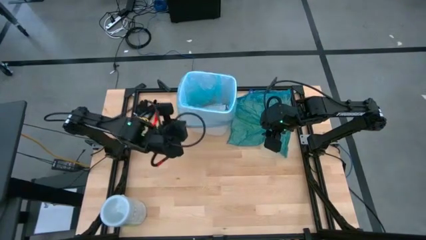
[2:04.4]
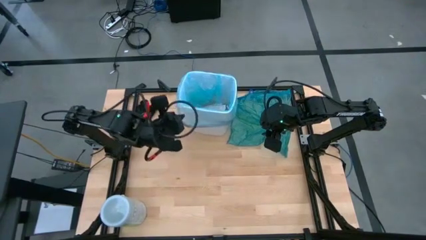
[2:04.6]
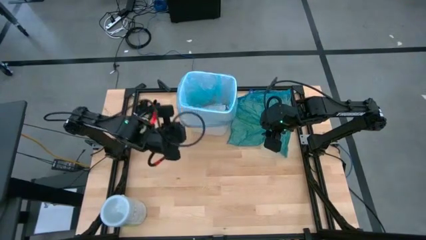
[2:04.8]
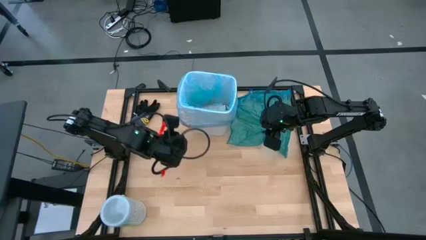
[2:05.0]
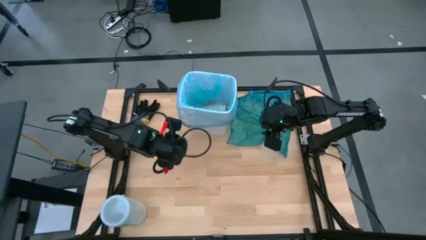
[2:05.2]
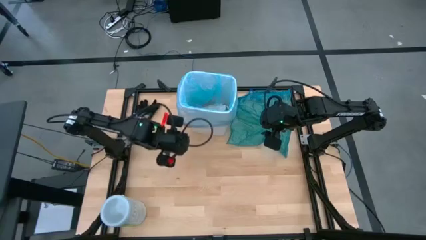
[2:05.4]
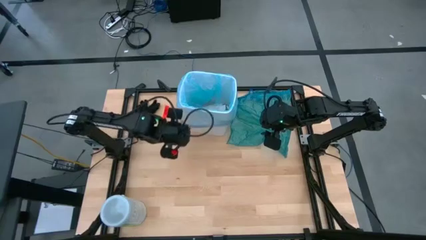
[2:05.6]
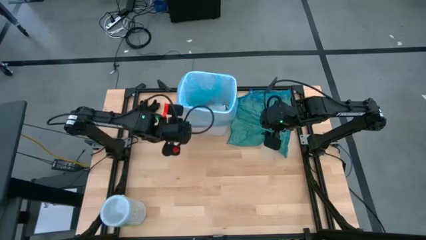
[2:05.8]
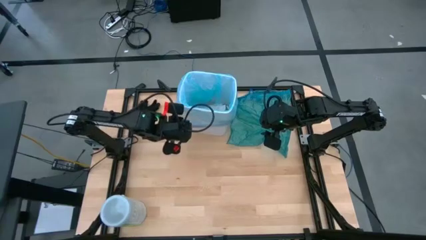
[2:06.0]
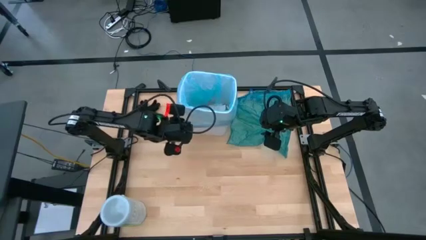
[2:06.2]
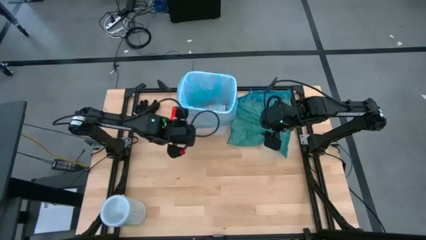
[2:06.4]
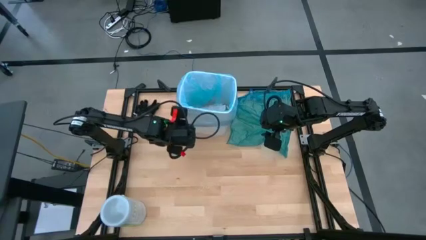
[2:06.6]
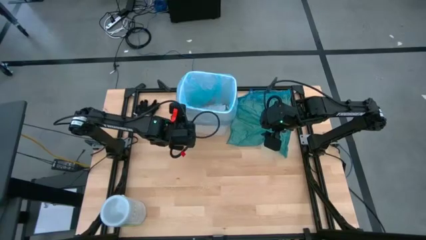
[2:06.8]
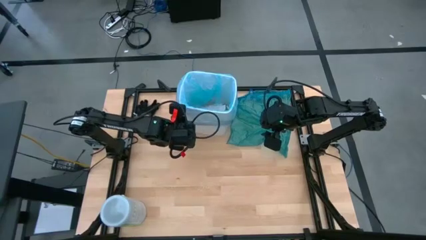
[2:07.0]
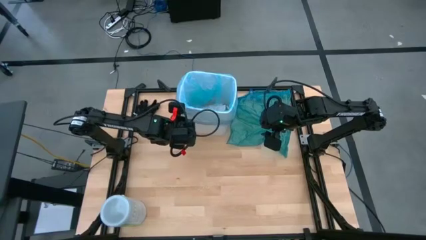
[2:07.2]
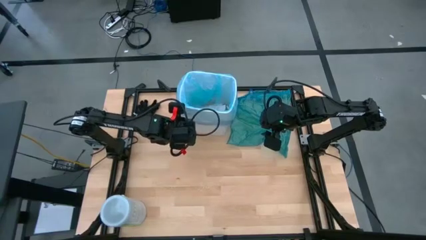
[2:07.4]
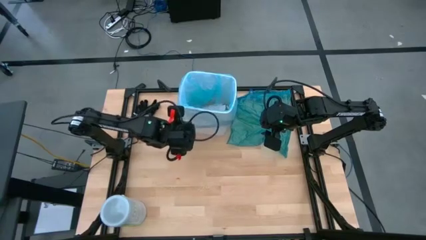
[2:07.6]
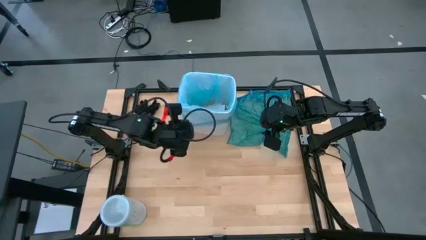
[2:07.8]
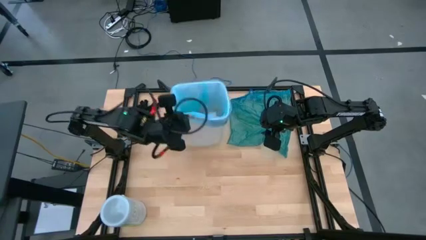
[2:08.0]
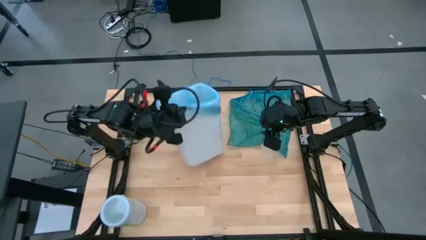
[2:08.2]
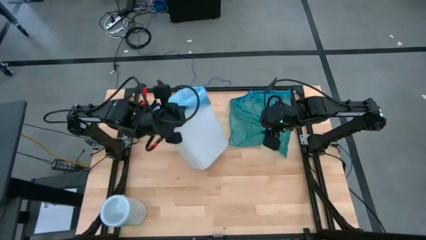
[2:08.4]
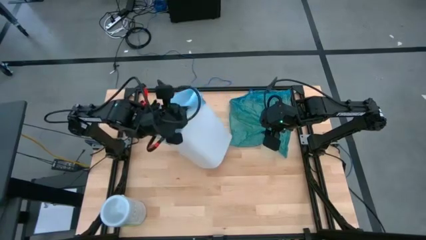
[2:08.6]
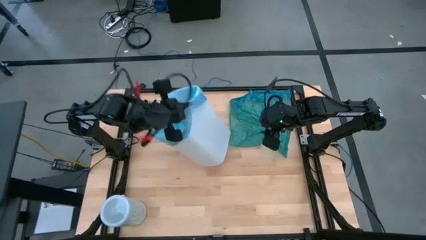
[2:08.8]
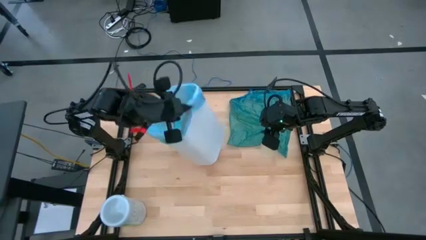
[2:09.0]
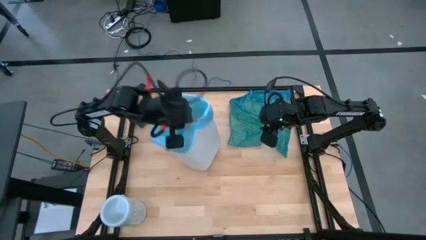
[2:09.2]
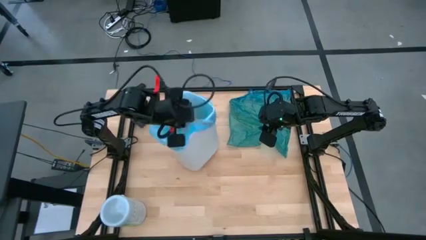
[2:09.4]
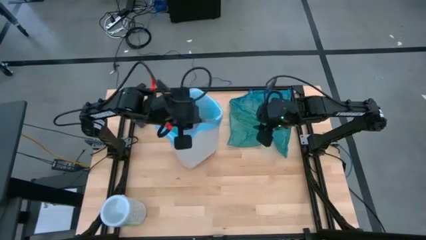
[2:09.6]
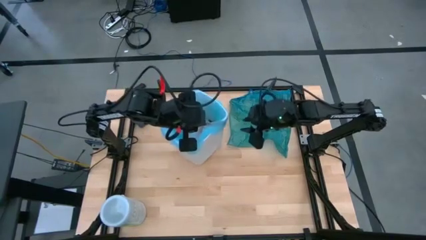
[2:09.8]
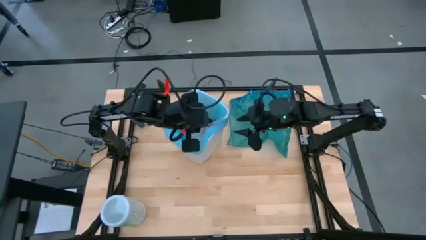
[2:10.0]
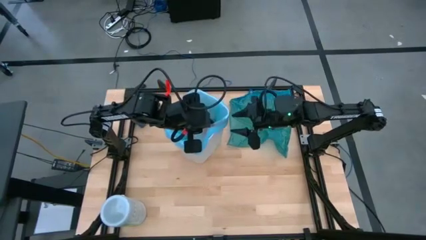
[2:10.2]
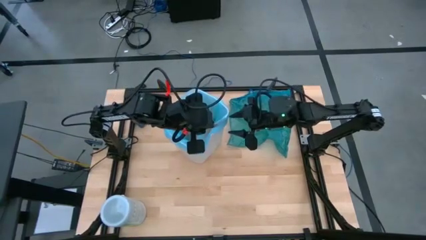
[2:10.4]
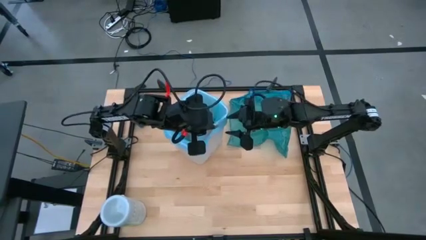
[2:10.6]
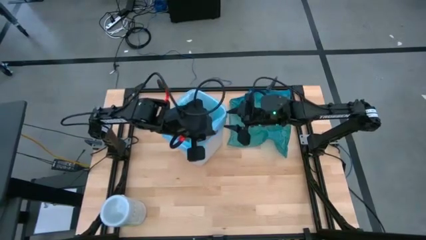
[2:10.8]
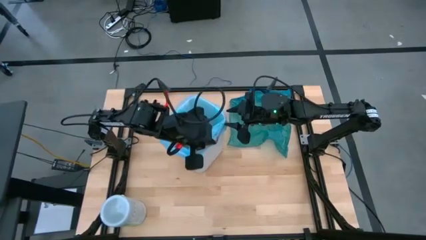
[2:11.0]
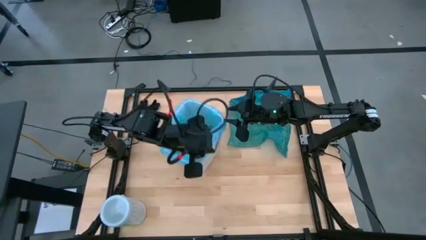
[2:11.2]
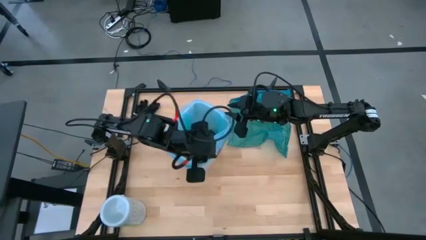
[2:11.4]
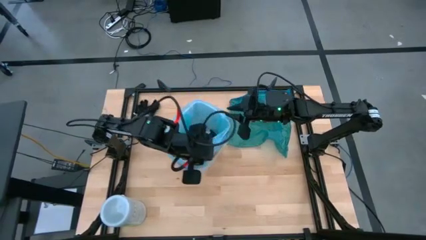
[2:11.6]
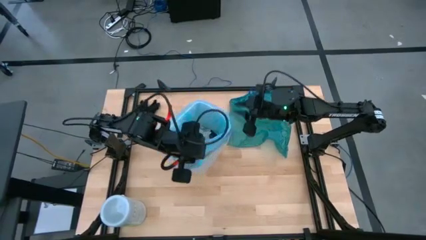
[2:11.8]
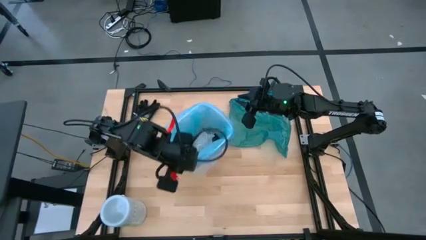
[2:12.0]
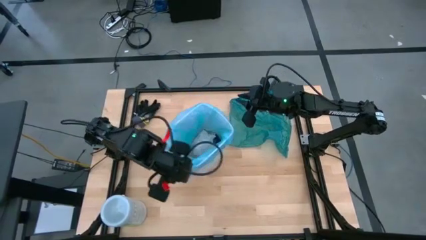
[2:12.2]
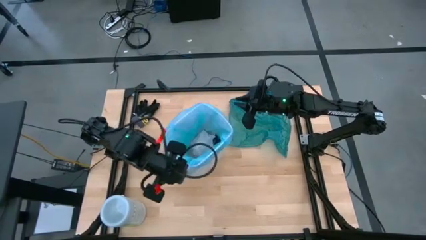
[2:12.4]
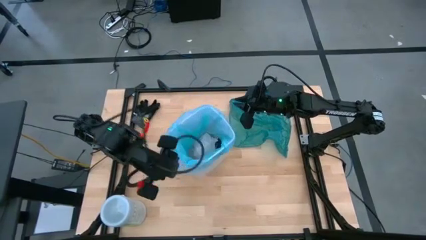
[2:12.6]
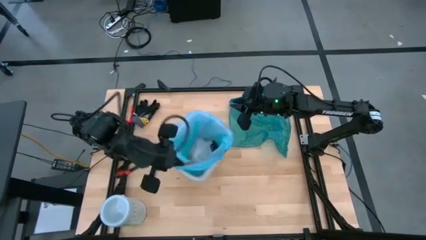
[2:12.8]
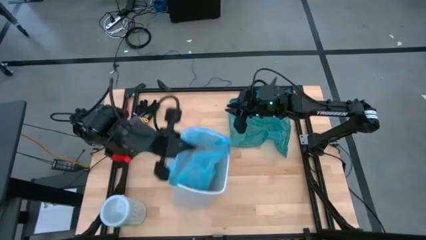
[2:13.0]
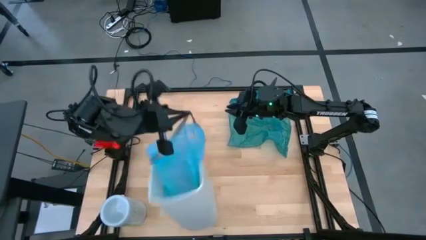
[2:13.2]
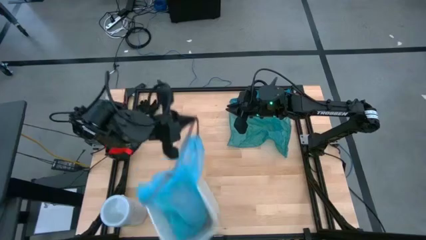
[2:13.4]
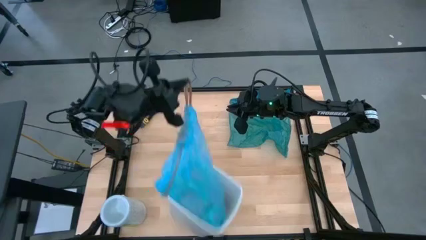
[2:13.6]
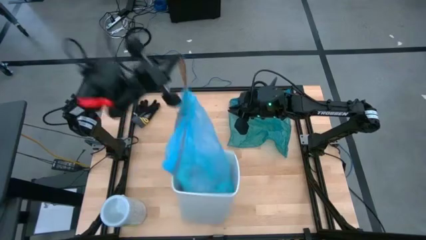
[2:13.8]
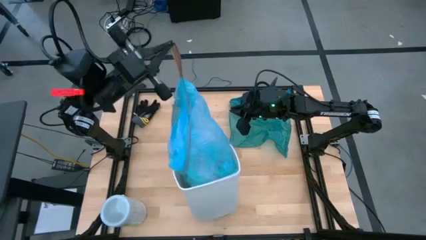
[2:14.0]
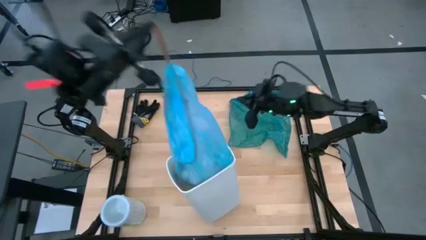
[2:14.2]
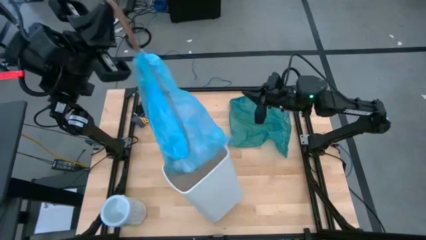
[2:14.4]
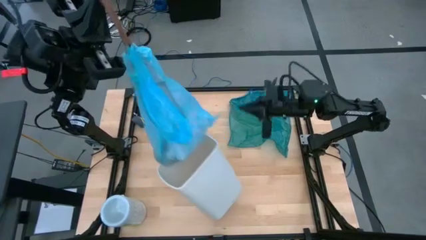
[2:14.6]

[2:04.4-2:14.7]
Task: place trash/remove bag and relplace
Remove the blue plastic trash bag from the trash bin

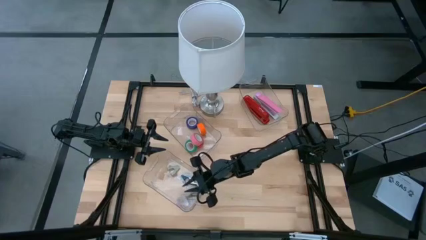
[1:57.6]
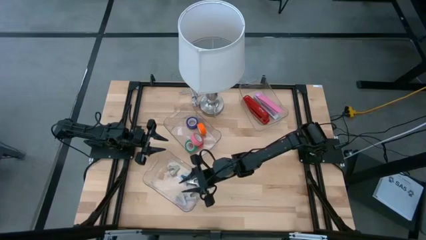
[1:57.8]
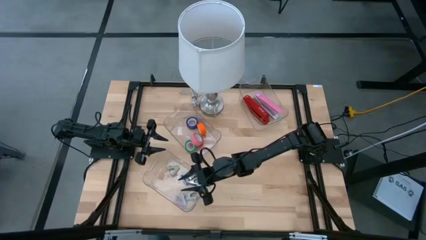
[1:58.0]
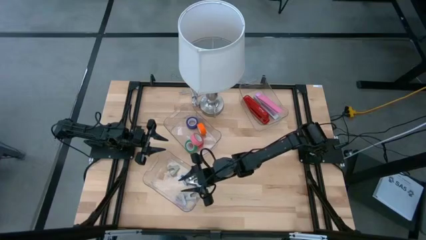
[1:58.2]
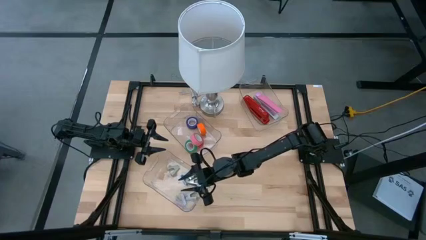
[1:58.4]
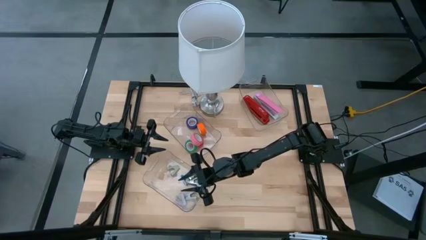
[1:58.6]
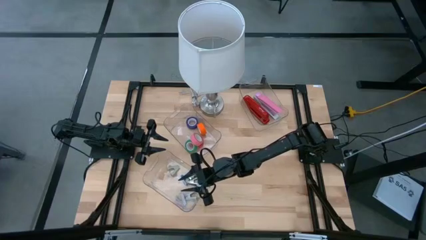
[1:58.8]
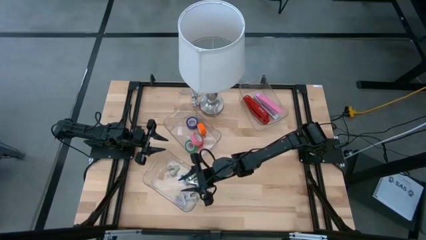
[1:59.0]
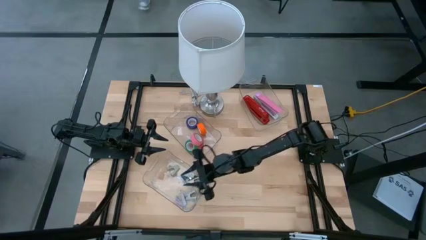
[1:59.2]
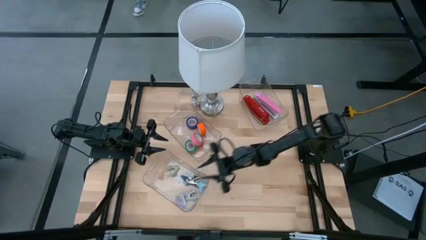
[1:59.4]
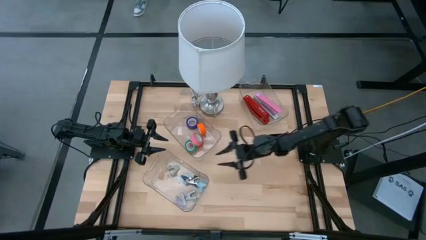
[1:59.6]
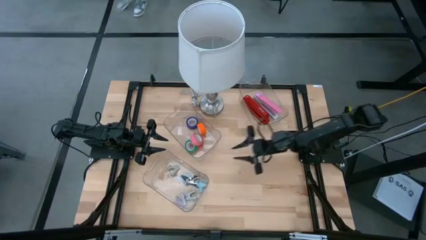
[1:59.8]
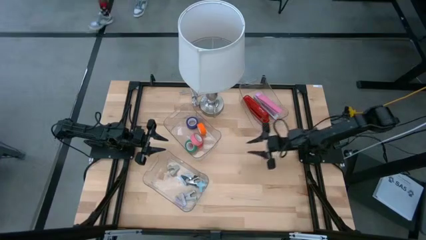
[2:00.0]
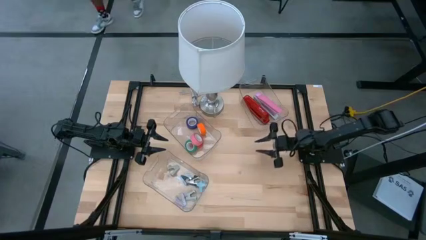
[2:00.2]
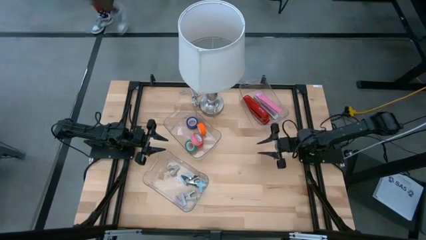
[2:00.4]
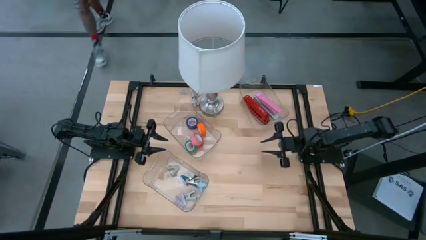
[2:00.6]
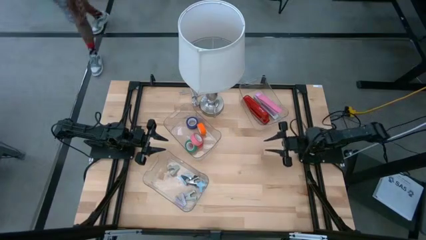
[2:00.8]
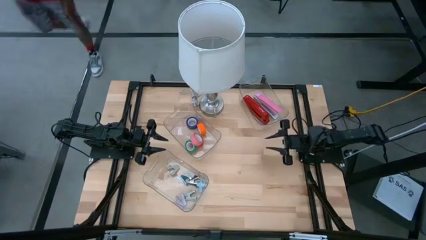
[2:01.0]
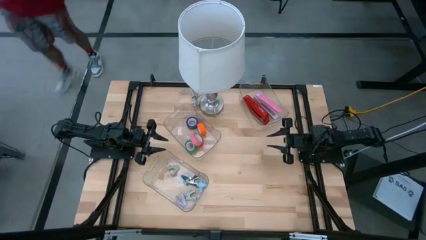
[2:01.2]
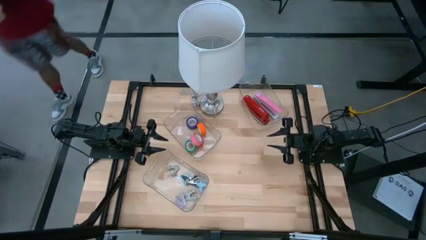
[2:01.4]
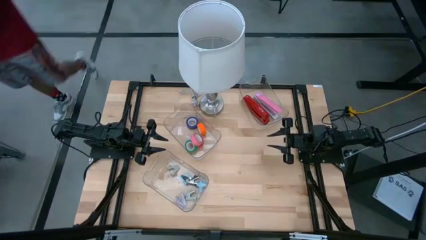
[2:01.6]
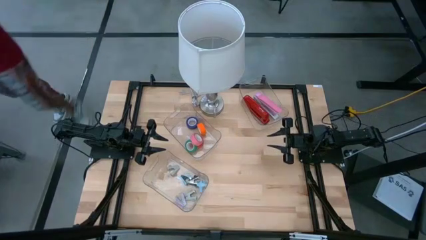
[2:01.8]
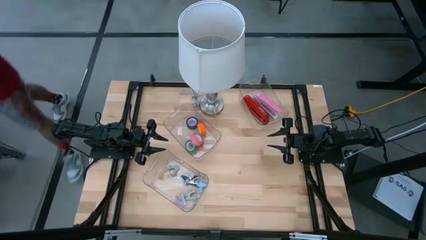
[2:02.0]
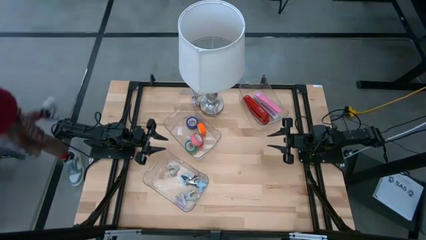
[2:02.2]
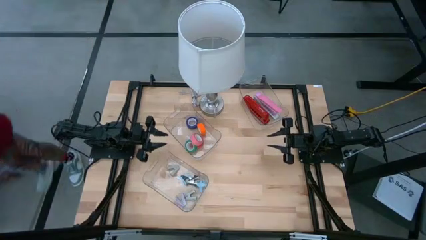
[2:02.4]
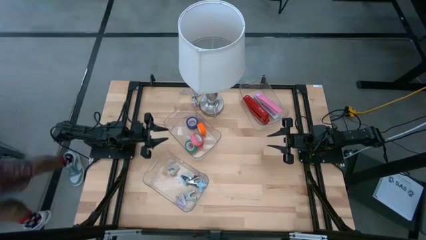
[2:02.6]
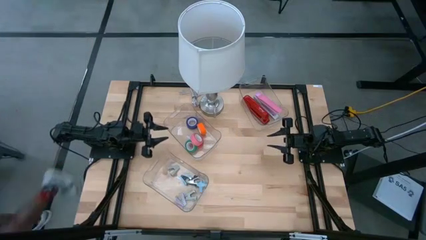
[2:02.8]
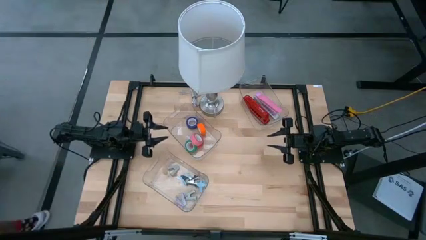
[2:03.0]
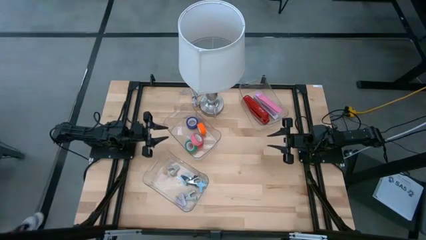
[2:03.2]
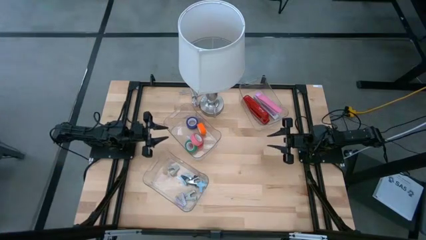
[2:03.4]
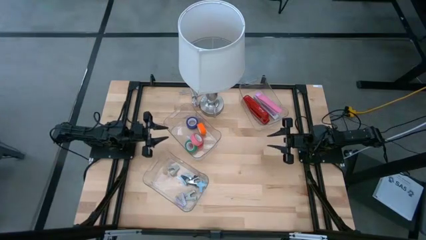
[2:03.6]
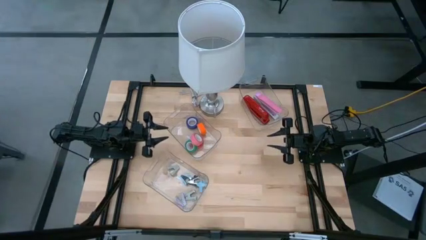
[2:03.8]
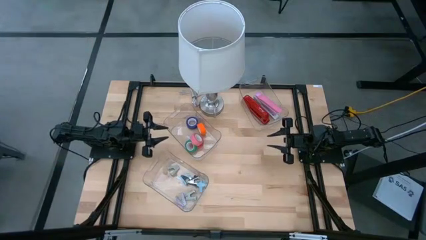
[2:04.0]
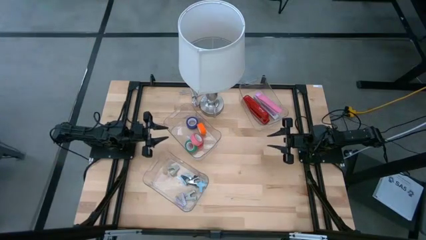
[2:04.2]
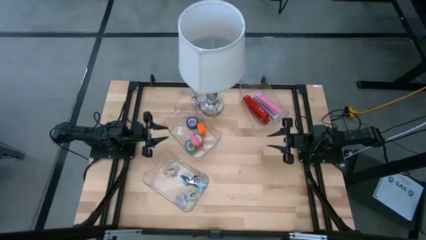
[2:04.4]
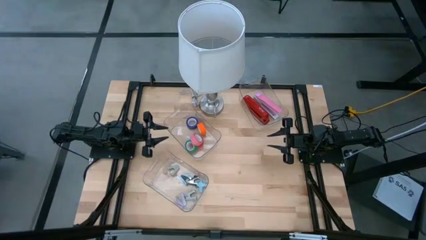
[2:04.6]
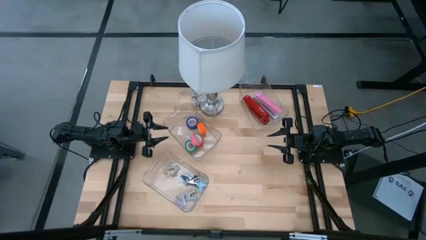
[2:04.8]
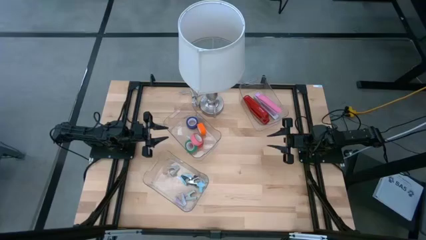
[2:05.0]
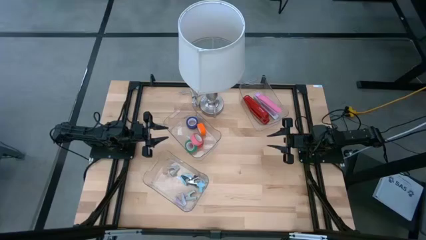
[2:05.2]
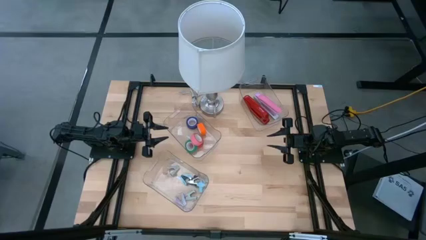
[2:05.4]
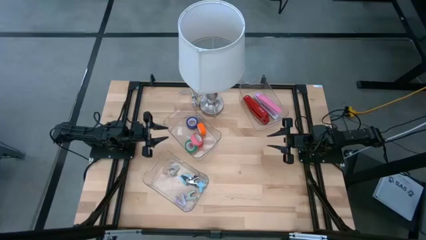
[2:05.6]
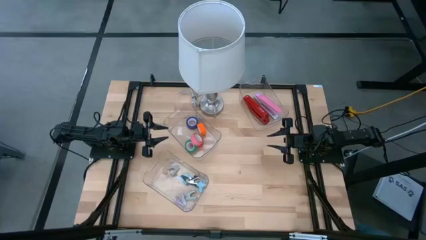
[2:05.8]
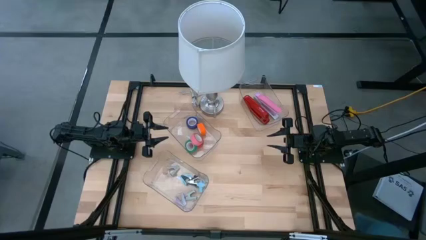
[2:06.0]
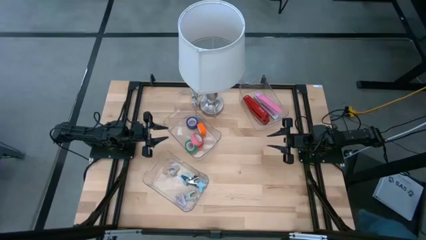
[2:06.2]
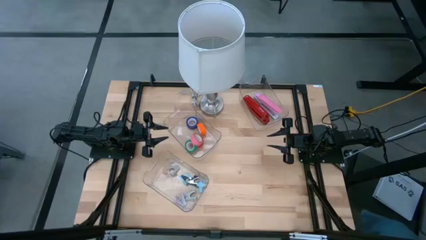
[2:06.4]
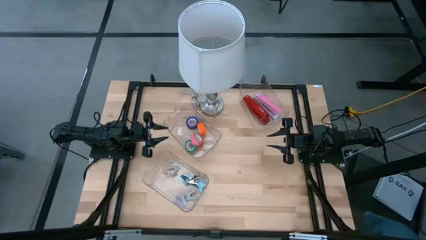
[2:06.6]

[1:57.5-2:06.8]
Task: Pick and place Stapler, Stapler remover, tape
Return to Home Position
